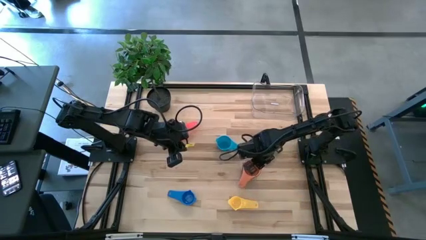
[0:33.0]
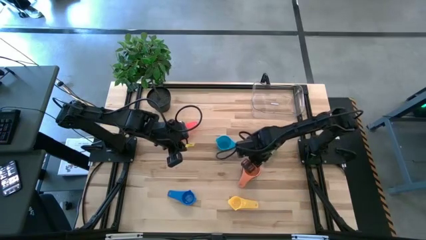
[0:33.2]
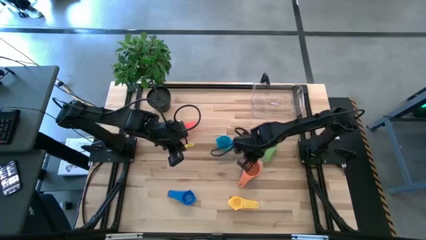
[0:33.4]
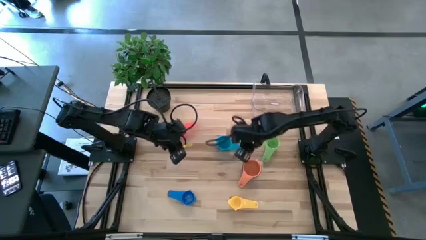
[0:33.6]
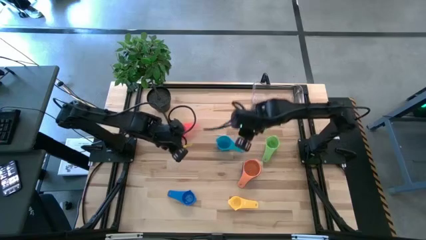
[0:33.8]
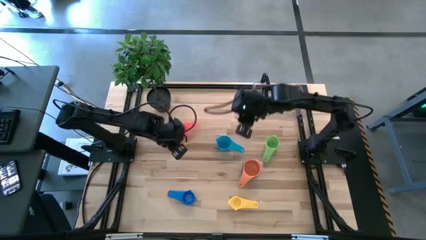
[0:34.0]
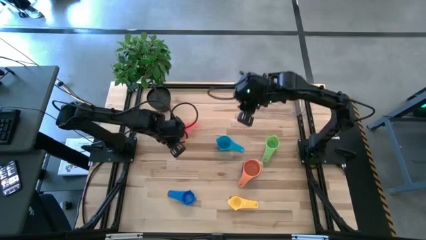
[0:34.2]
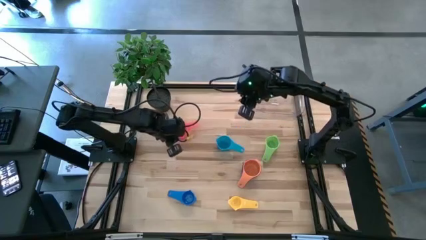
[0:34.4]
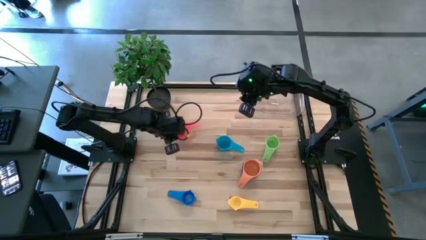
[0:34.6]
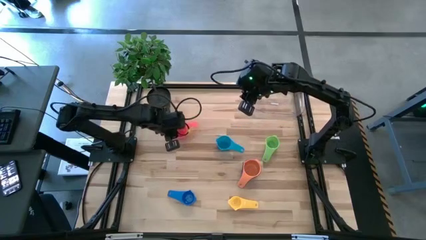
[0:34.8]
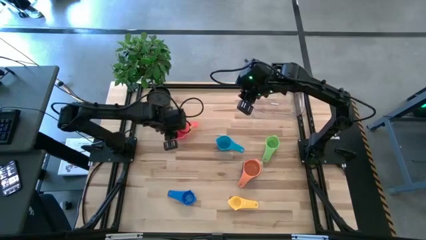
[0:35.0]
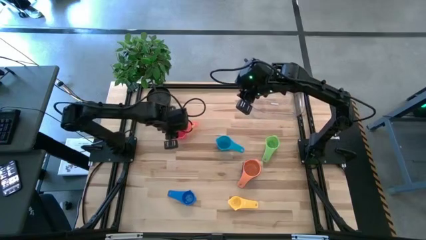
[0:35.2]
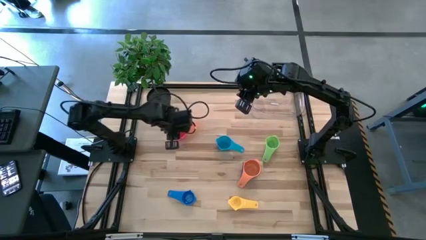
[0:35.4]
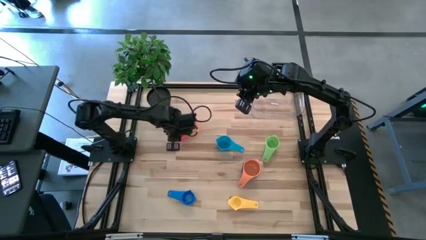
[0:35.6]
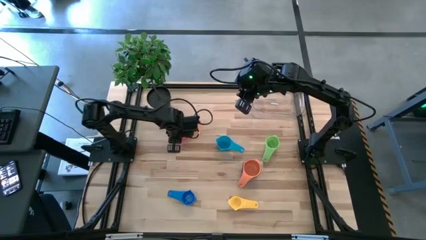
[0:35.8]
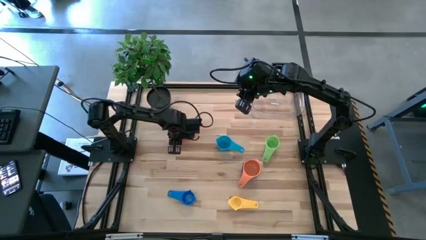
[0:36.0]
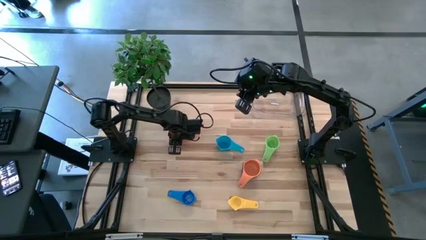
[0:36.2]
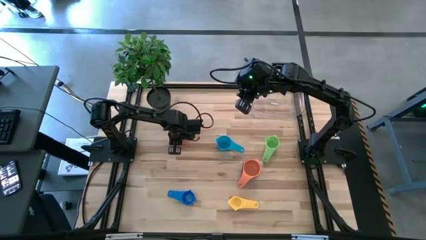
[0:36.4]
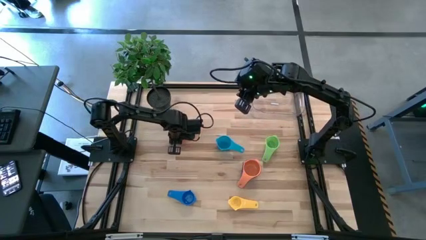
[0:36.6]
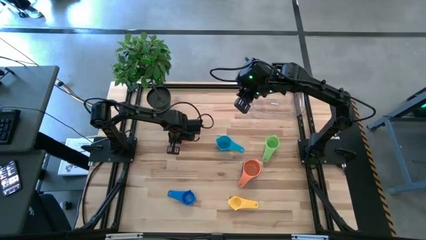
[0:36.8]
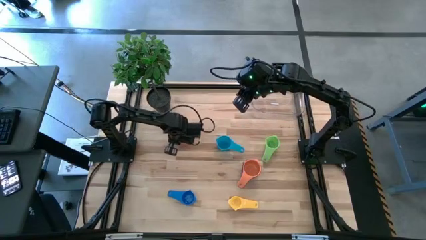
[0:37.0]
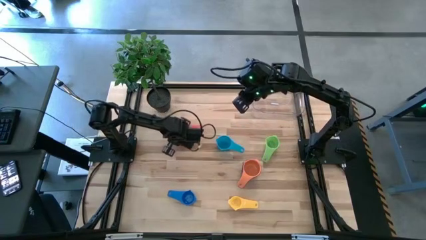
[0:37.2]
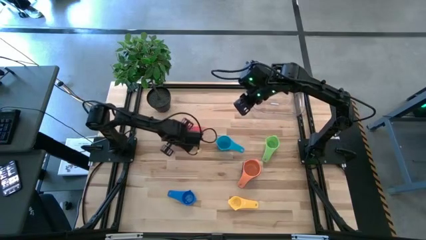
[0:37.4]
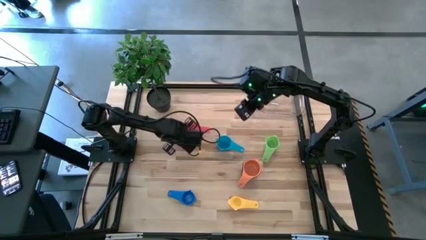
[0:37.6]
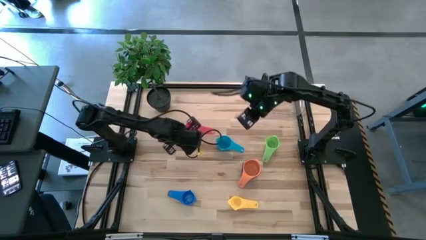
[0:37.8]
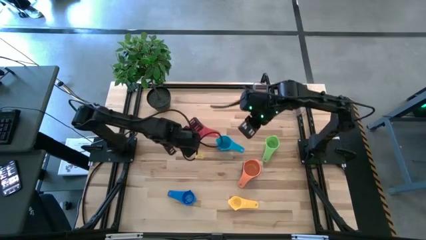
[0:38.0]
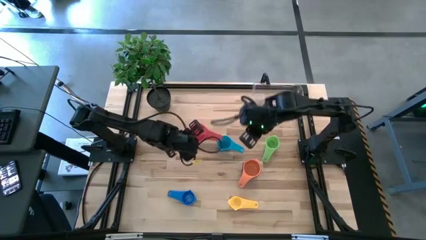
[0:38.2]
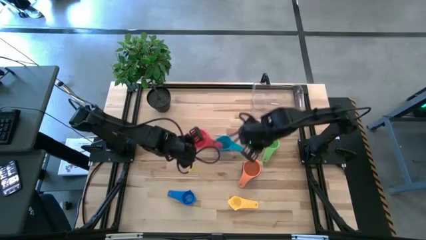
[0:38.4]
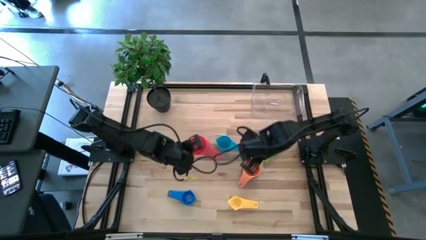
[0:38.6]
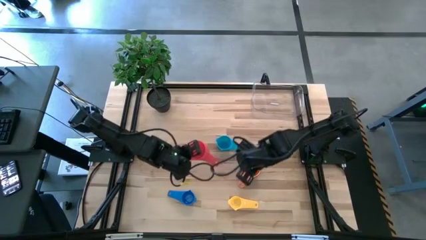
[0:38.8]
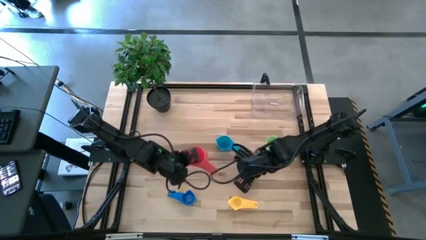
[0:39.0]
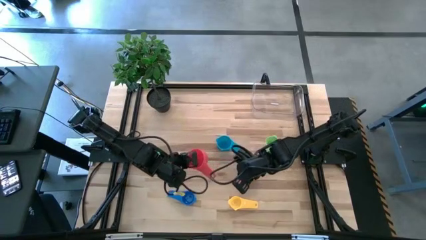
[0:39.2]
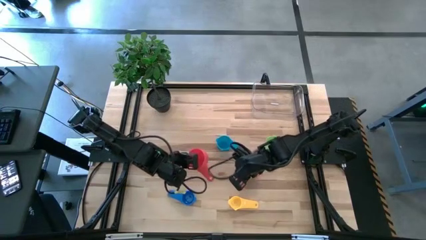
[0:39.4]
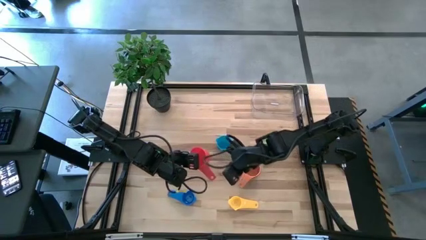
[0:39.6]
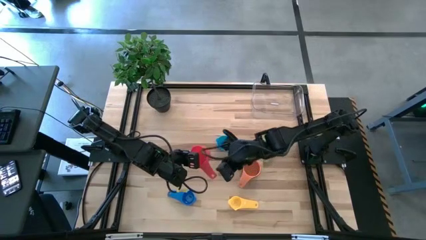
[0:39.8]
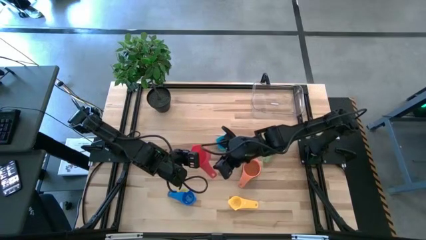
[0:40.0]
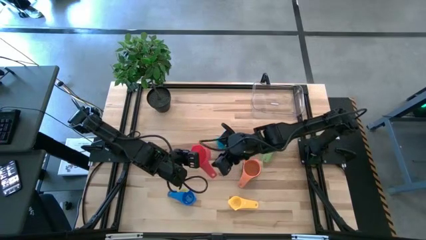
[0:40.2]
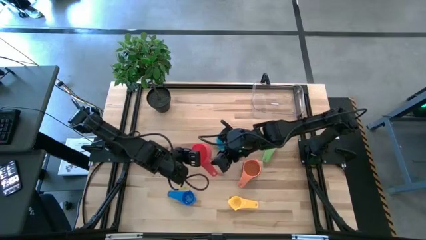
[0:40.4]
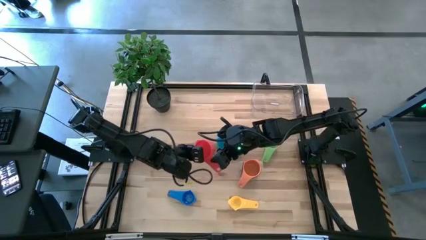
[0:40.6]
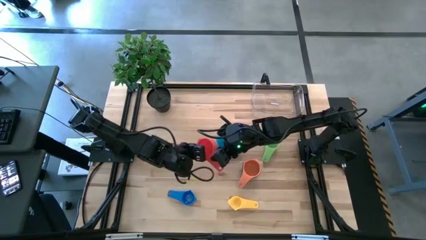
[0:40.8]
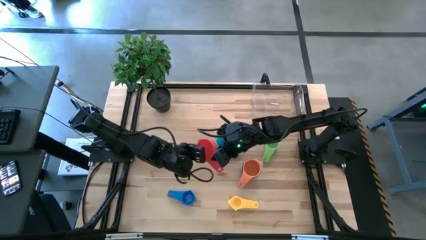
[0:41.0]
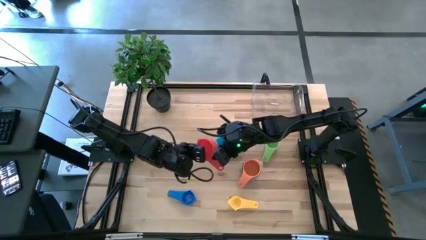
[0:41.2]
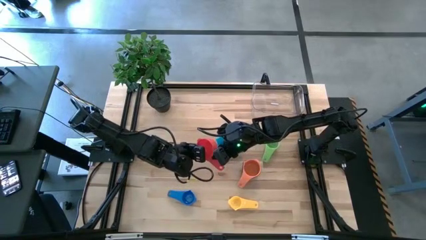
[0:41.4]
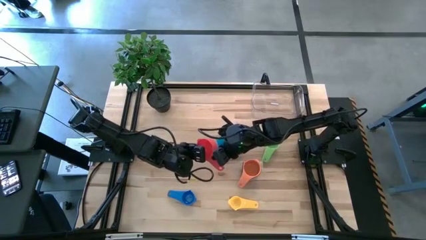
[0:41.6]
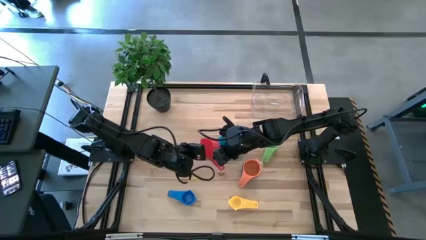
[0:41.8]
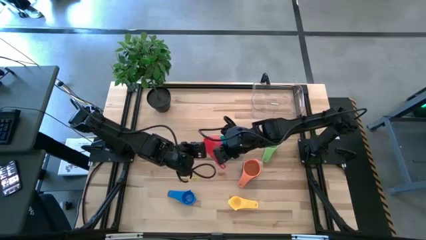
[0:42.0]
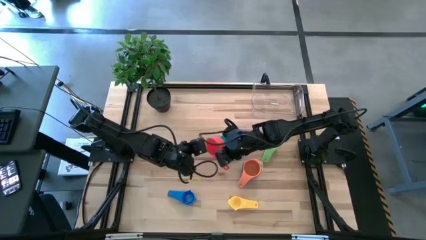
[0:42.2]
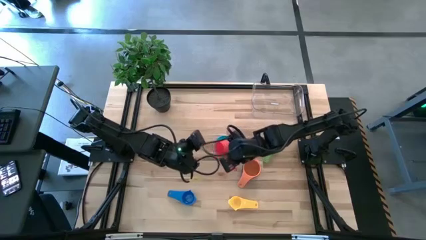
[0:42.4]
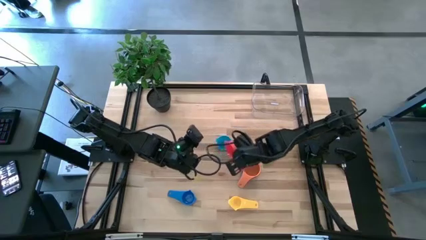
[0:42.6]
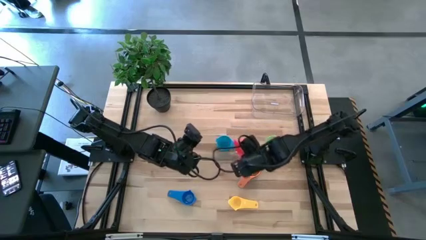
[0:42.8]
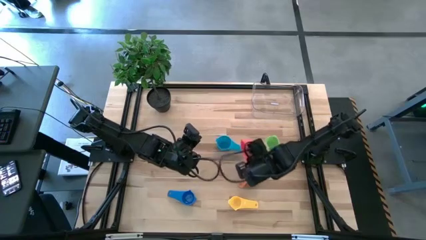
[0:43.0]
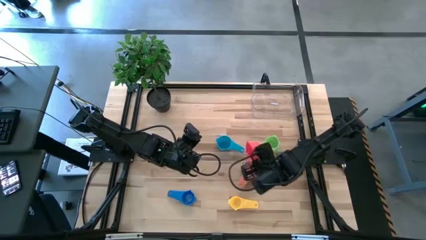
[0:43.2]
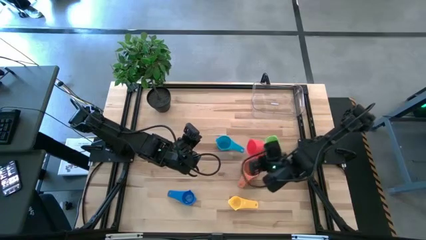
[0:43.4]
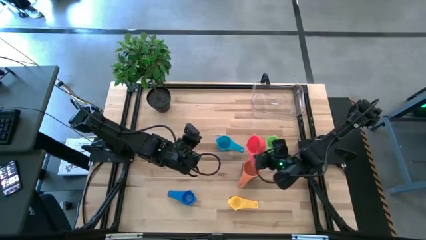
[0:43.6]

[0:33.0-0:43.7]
Task: Nest measuring cups in basket
Stack the red measuring cup on top of the orange measuring cup
